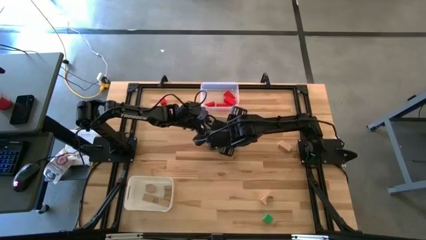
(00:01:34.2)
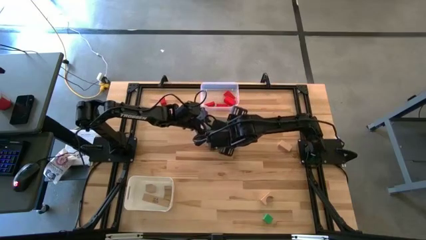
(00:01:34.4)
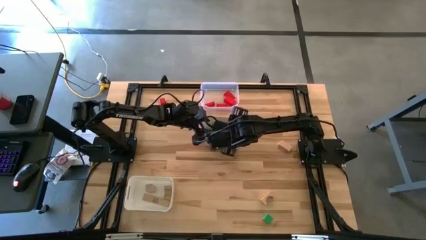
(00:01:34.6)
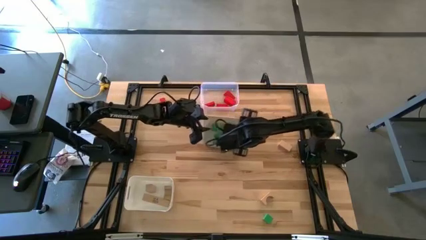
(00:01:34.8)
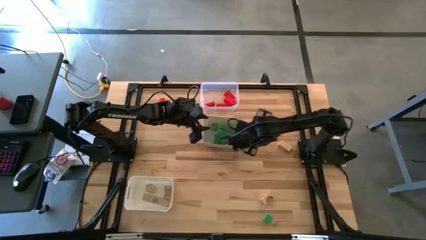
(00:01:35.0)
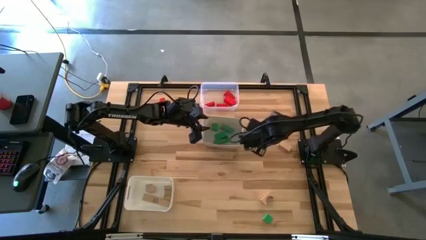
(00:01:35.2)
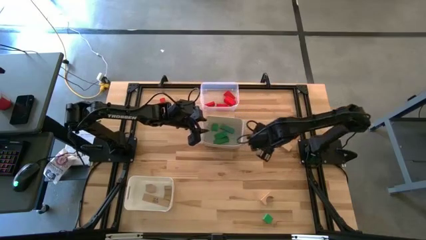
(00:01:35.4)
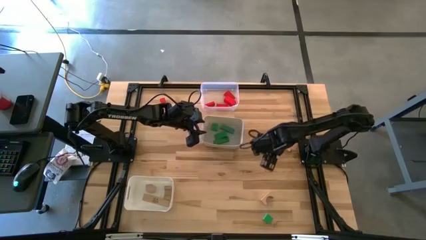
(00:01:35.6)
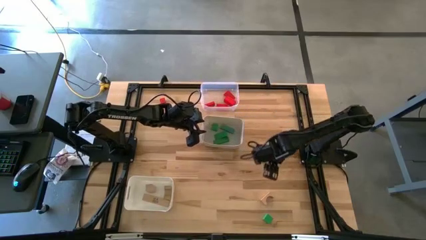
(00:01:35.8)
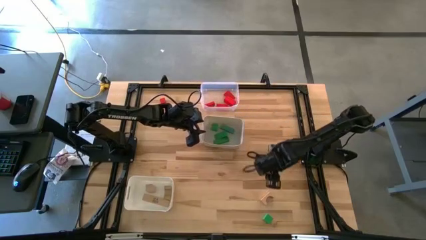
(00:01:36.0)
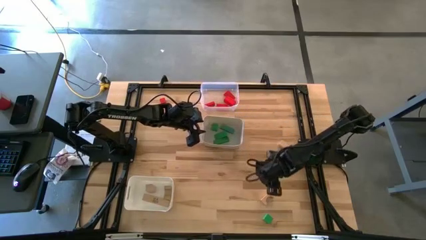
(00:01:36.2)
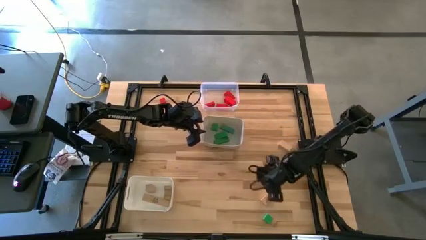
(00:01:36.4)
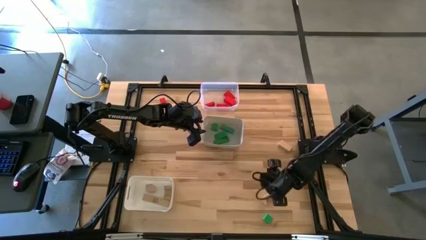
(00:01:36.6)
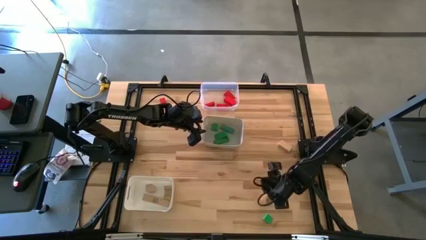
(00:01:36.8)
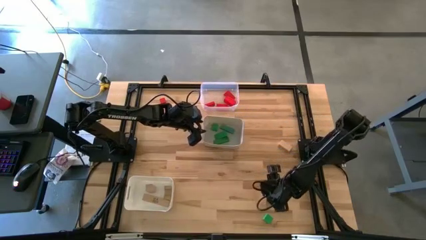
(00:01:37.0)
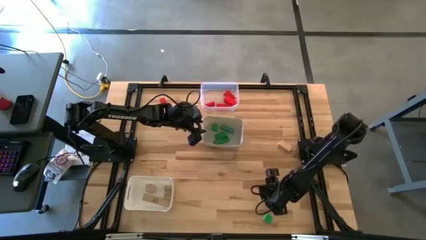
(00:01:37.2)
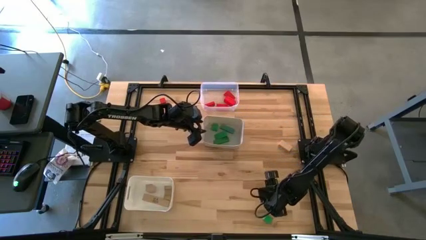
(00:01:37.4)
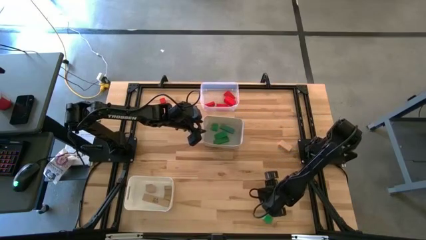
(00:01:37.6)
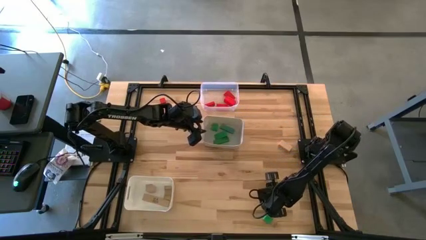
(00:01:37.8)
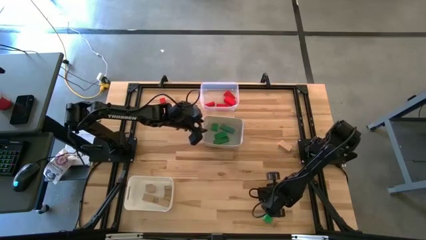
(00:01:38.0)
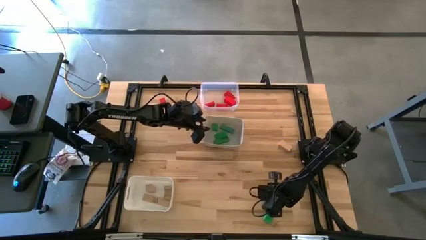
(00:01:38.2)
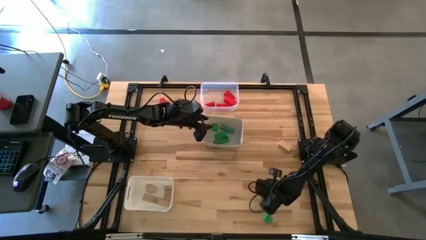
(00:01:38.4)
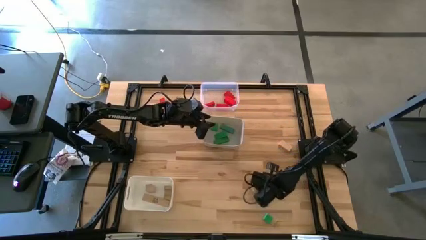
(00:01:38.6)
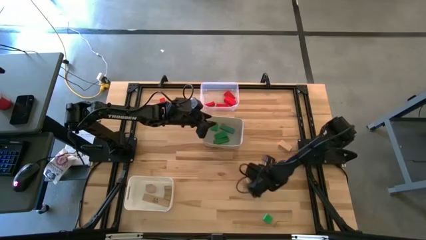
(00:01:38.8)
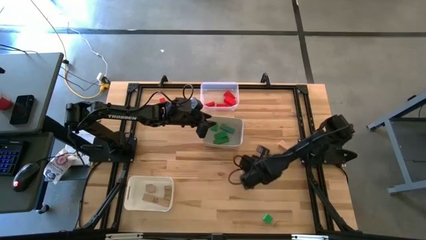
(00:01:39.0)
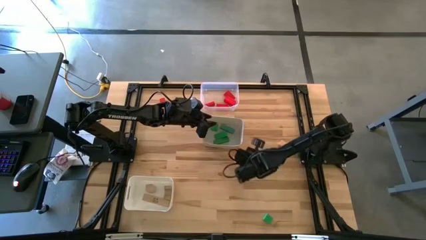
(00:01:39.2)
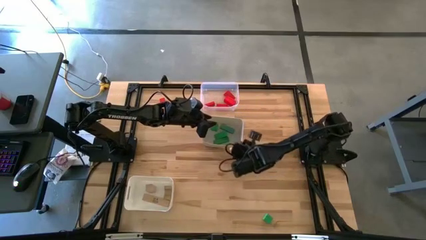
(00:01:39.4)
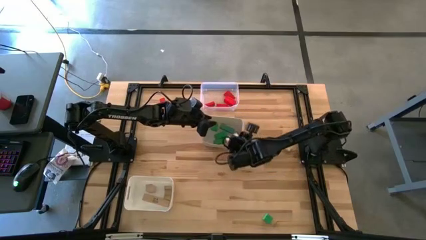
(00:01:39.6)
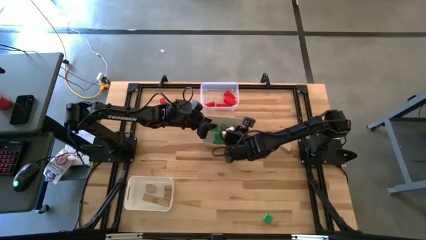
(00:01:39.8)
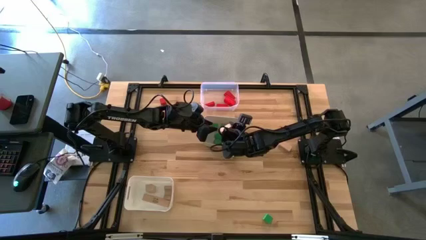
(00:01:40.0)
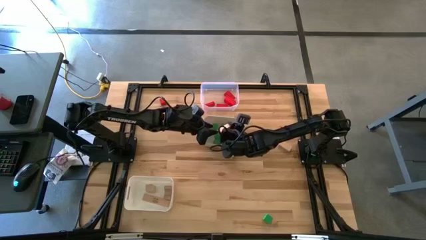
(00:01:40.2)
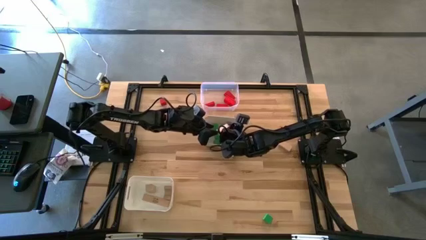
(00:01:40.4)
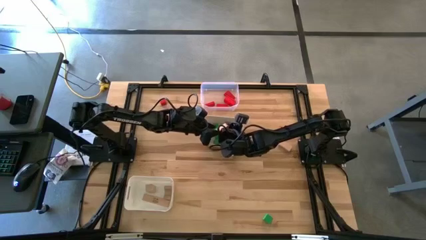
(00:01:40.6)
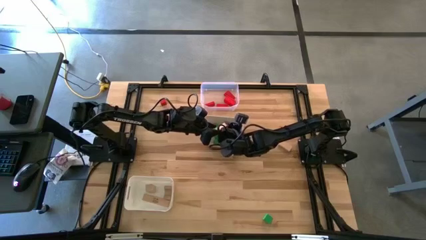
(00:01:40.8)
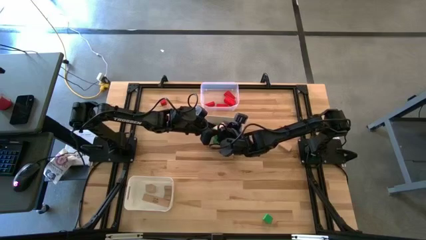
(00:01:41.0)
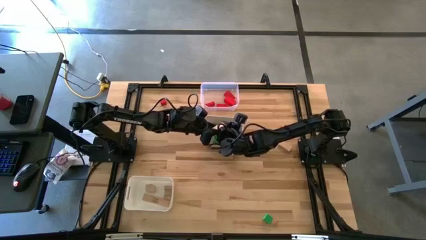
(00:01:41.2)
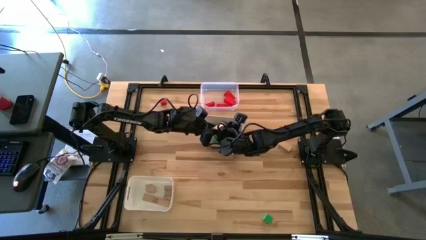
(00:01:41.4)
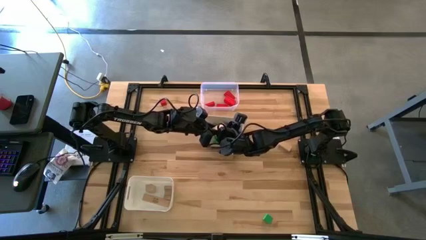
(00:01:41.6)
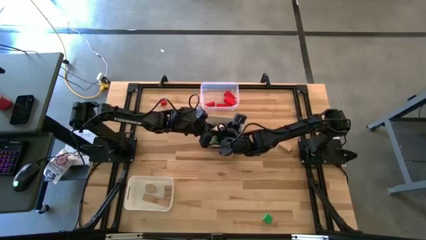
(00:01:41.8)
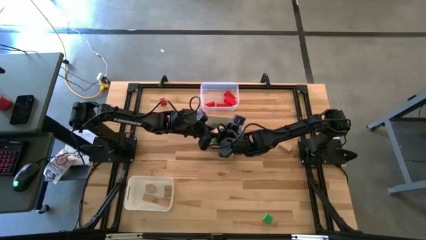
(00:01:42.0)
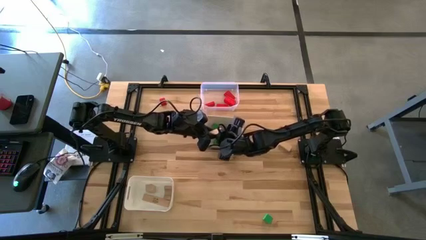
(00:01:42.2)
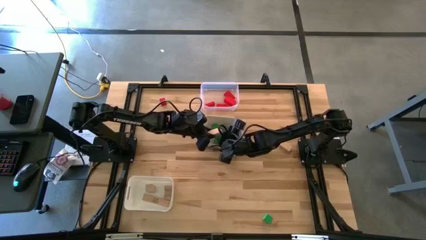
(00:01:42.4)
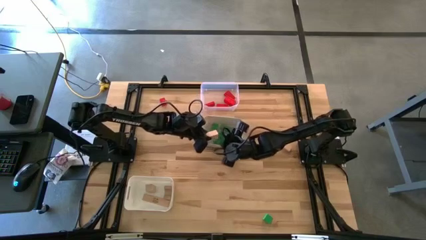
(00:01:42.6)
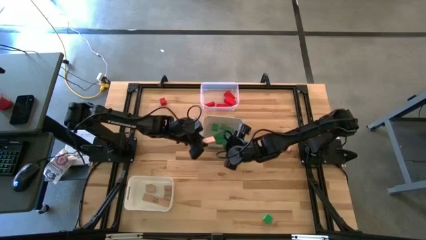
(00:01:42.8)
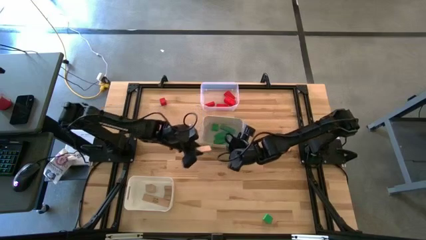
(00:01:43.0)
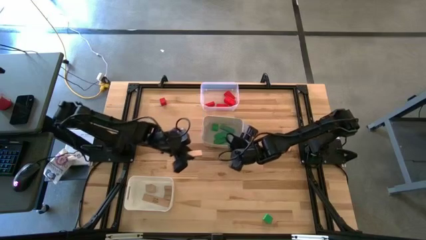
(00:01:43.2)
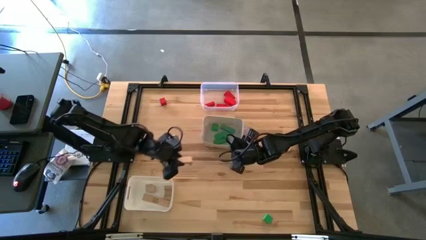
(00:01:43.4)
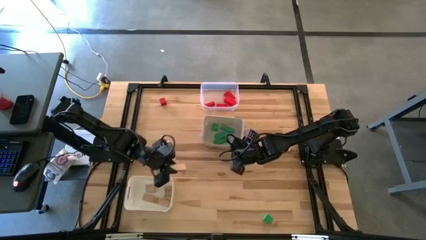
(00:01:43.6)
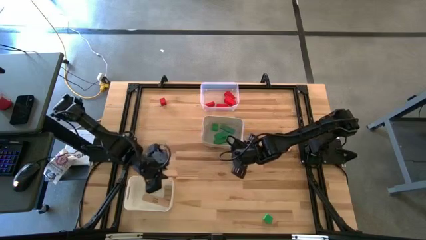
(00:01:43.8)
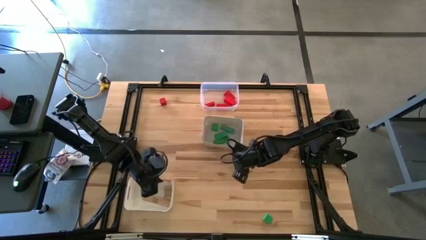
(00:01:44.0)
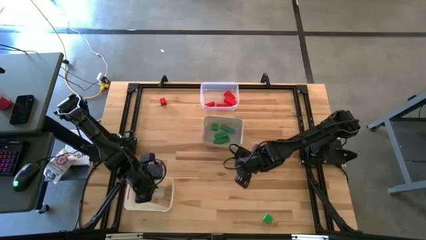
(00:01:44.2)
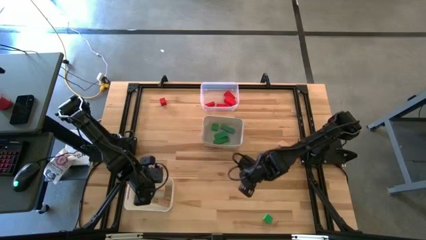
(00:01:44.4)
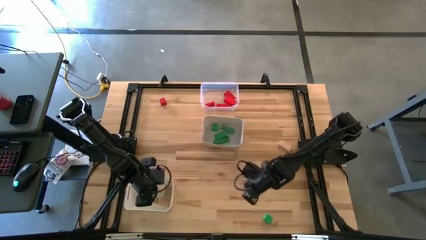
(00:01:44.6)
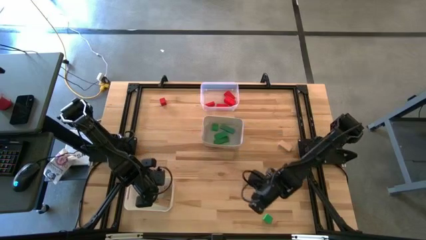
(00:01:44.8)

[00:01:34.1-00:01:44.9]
Task: Sort & place blocks by color
Put the brown arch block into the bottom white bin

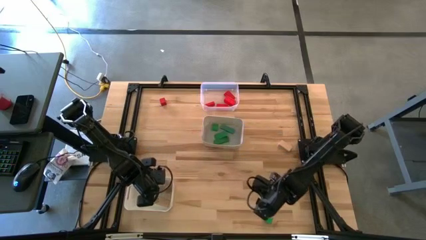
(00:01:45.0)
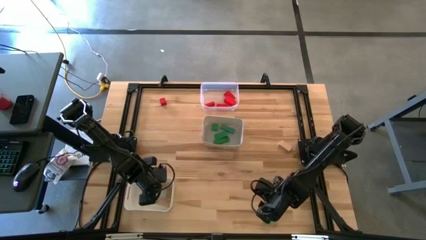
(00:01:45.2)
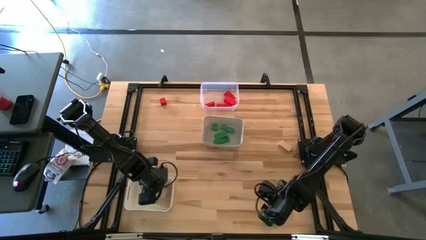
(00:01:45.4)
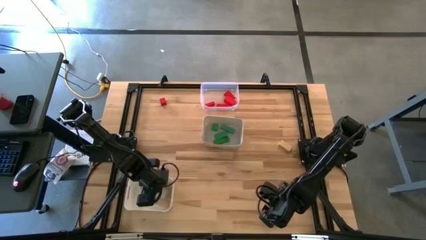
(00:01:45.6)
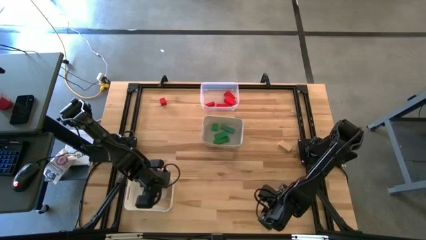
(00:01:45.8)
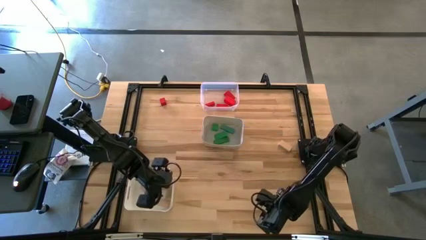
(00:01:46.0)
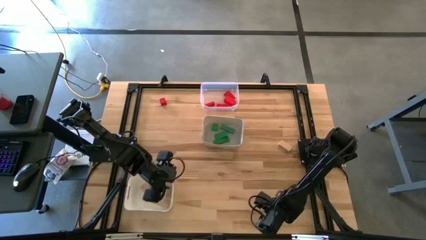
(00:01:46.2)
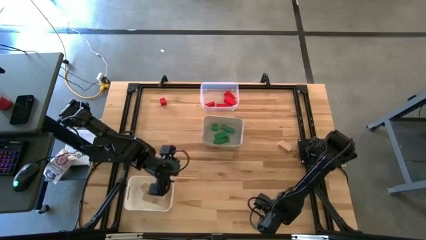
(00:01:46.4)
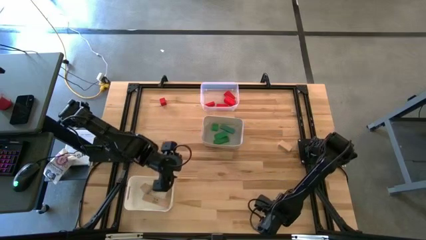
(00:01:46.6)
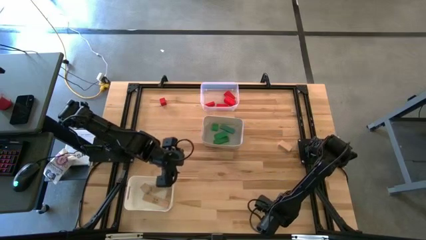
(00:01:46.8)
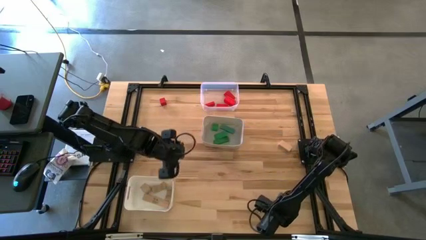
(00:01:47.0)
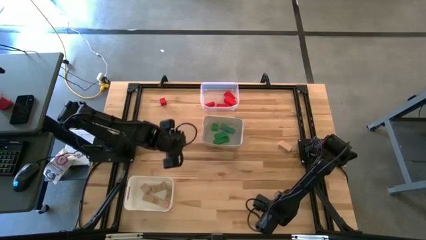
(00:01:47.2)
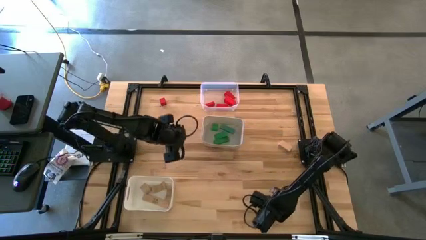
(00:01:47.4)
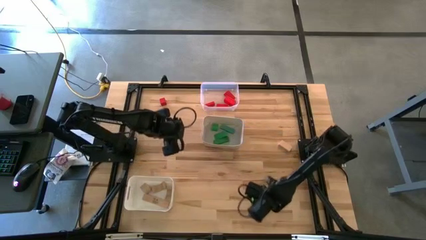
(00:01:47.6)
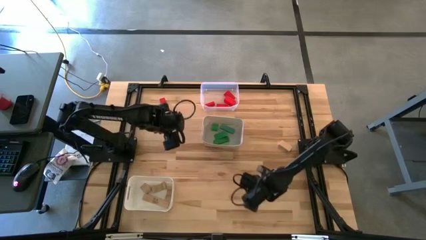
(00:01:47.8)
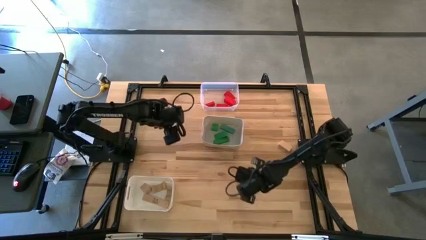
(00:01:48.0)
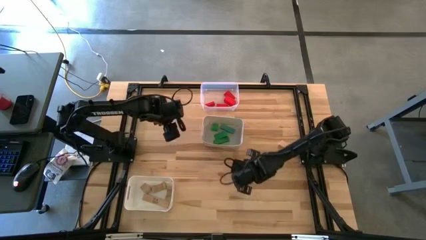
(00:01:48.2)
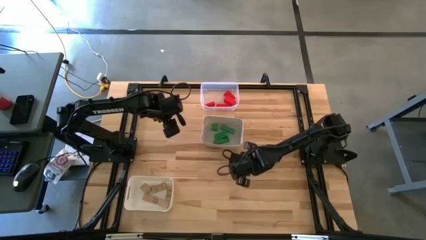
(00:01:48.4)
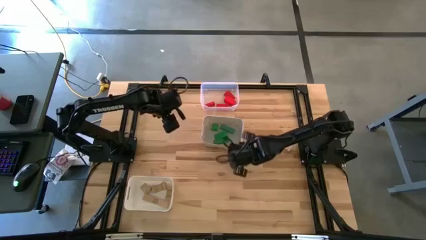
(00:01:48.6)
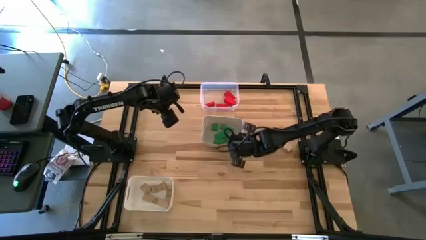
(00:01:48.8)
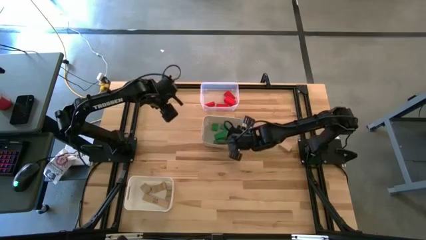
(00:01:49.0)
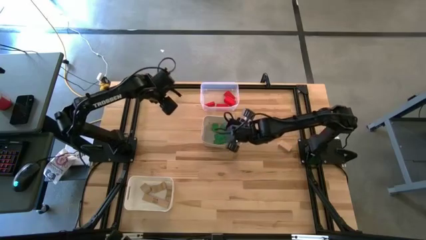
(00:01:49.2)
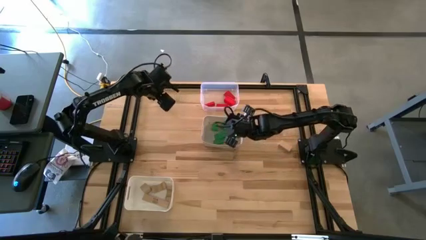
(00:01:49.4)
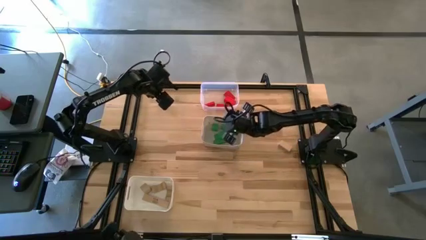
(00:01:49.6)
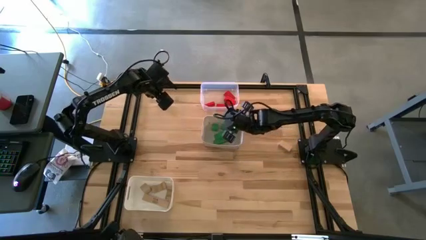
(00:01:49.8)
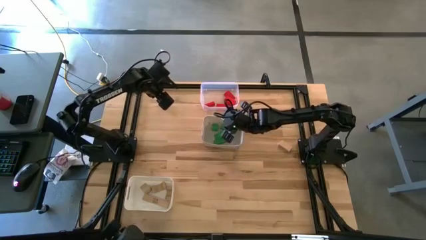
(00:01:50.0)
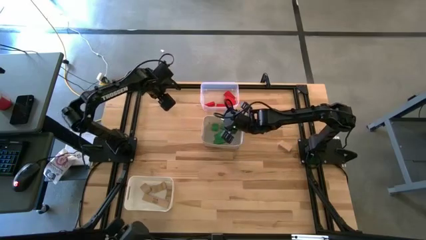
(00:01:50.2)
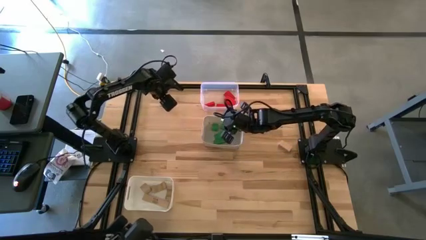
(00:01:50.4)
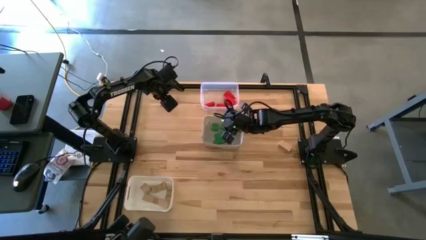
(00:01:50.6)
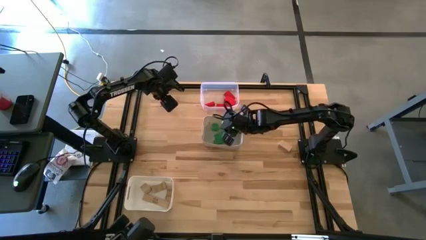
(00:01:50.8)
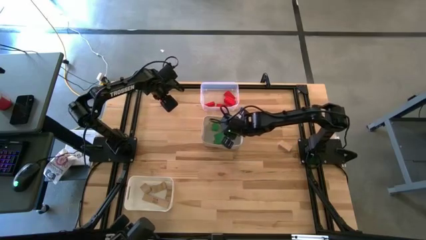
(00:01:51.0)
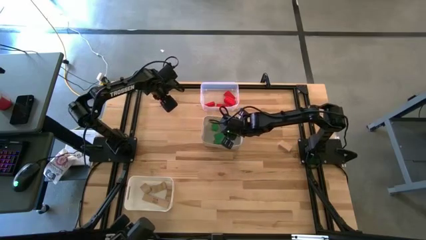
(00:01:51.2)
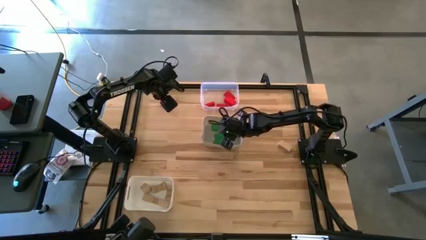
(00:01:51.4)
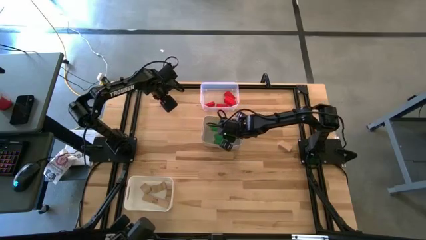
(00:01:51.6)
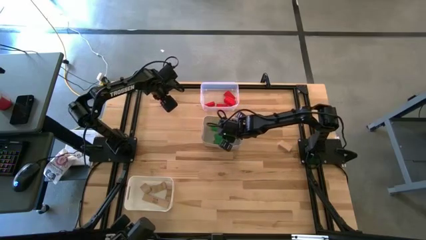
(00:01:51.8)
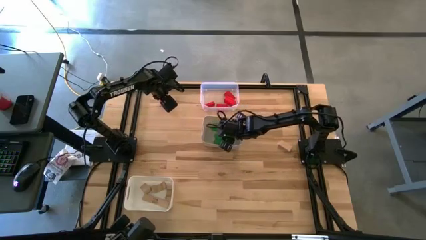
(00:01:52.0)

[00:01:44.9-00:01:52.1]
Put the green cube block into the top white bin
